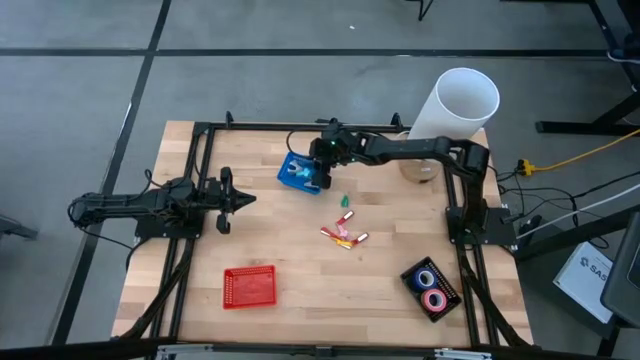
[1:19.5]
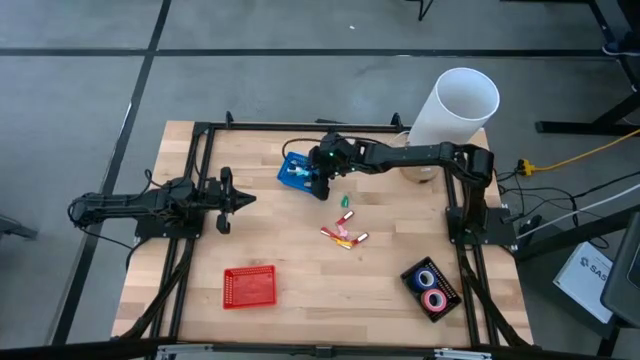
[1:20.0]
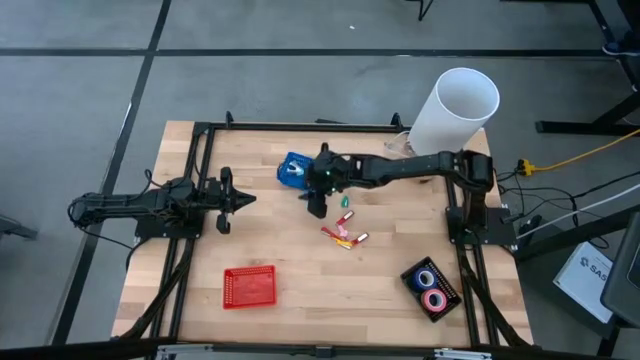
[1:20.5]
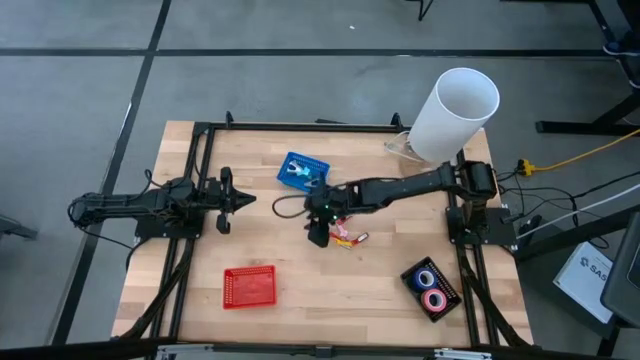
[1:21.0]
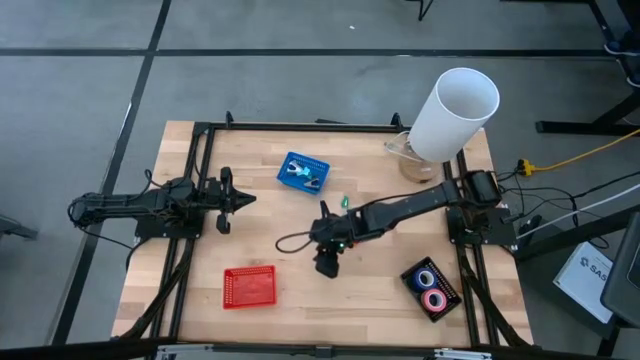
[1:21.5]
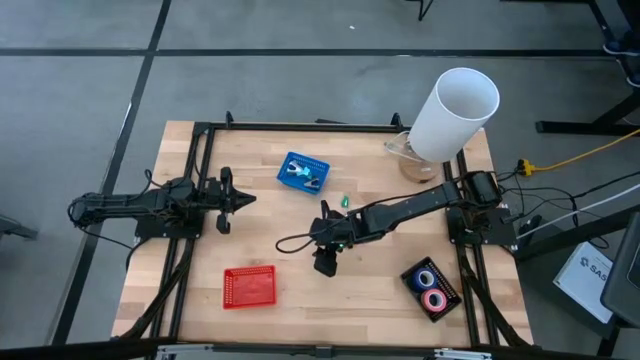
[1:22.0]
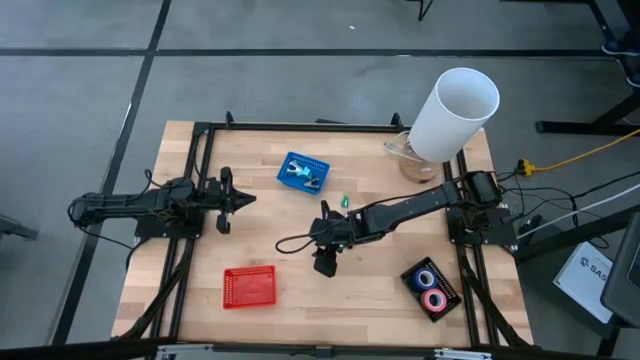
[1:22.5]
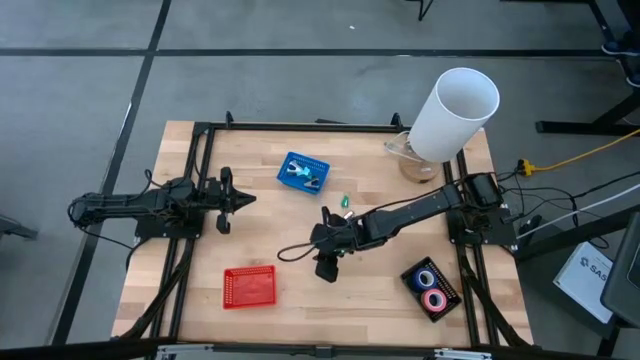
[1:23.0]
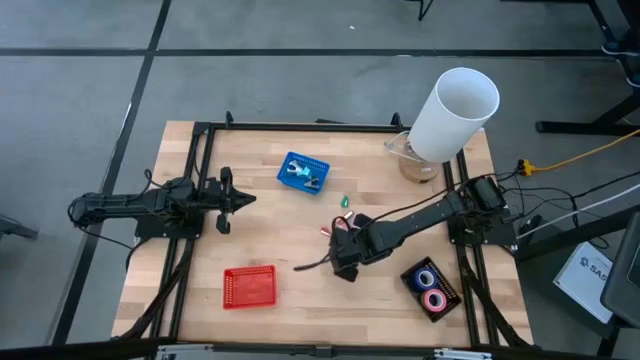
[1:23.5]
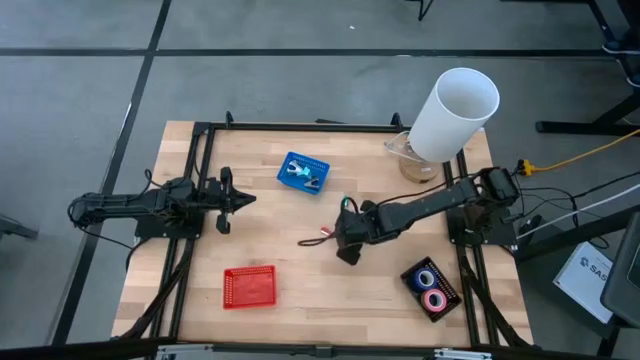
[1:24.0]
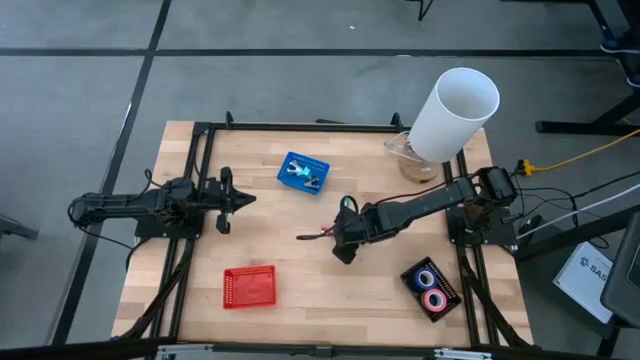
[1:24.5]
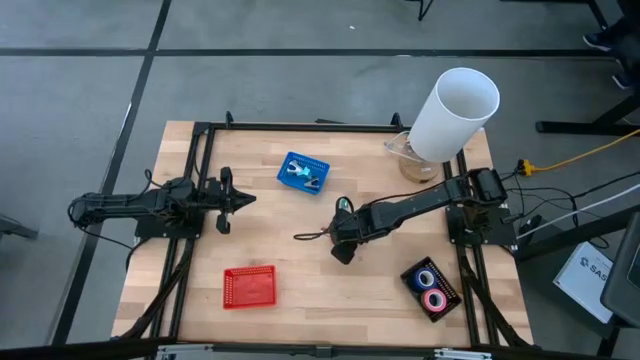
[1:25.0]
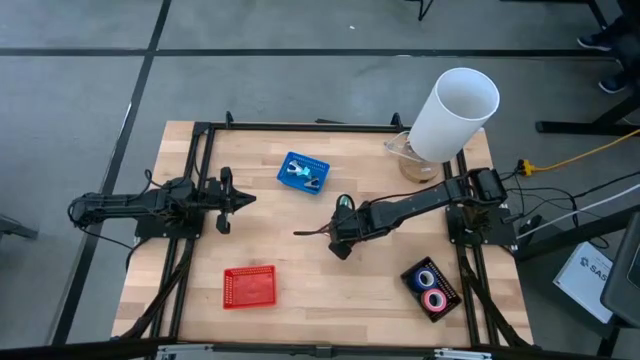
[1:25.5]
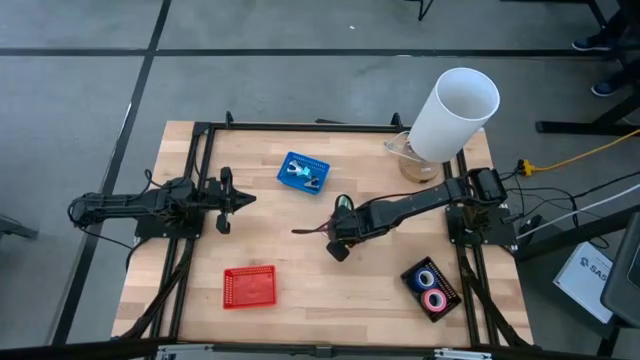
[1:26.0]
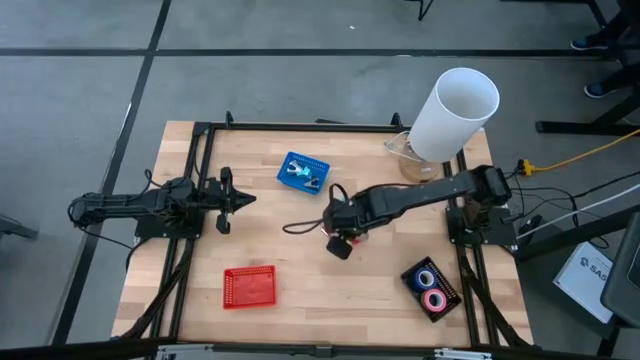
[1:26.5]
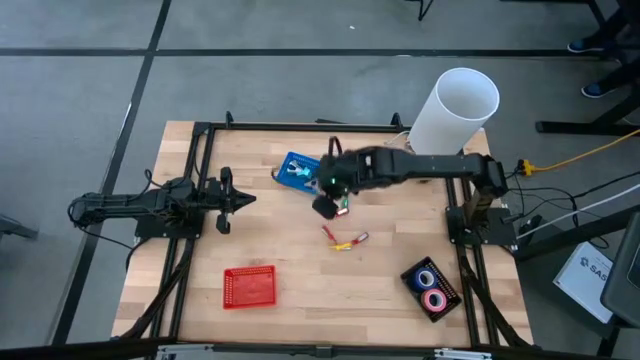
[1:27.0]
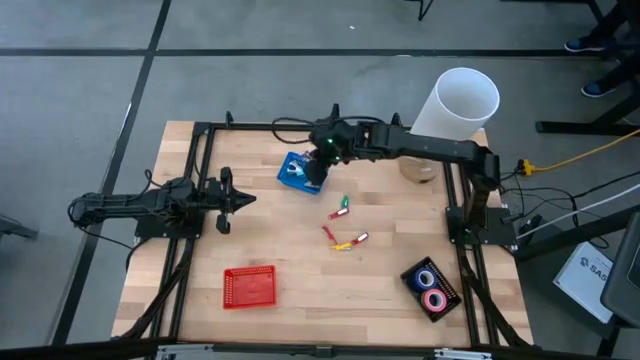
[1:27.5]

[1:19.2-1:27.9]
Task: Pick and place Stapler, Stapler remover, tape
Put the pink staple remover into the blue bin

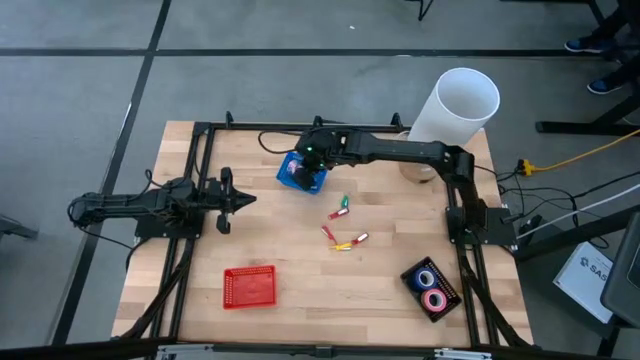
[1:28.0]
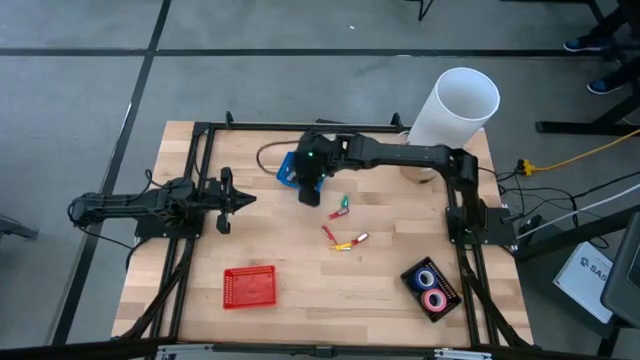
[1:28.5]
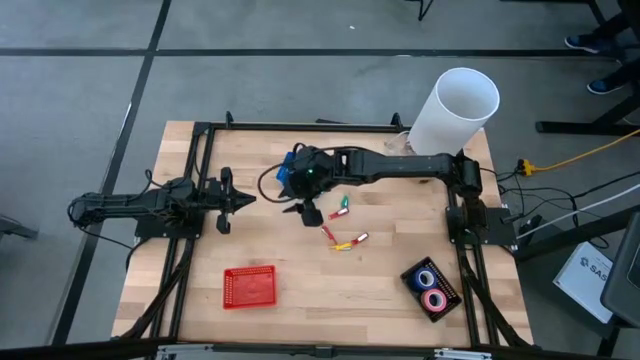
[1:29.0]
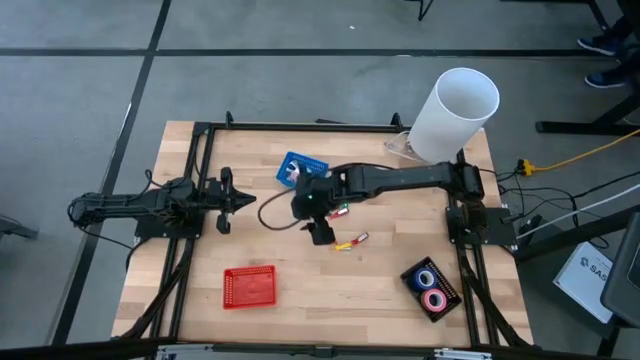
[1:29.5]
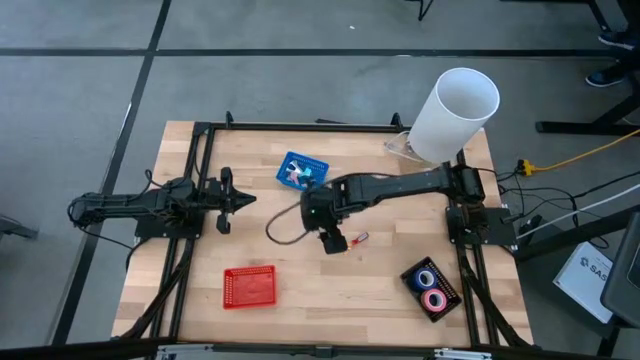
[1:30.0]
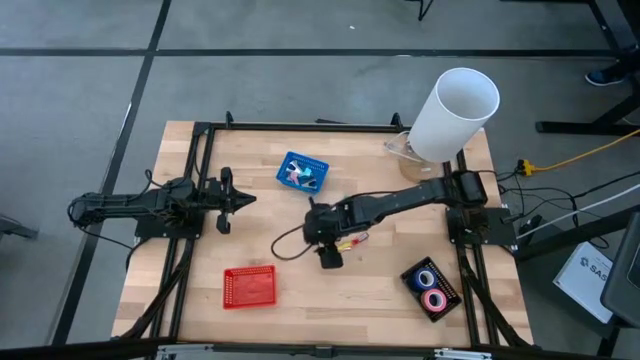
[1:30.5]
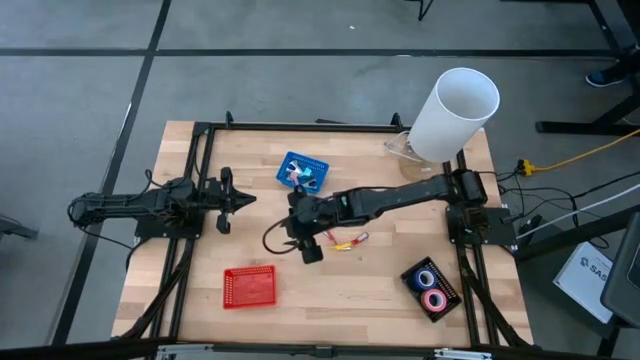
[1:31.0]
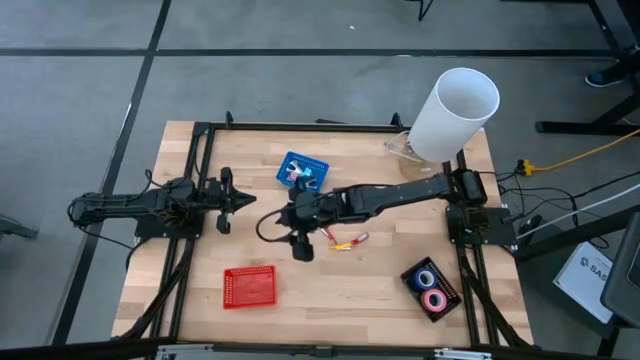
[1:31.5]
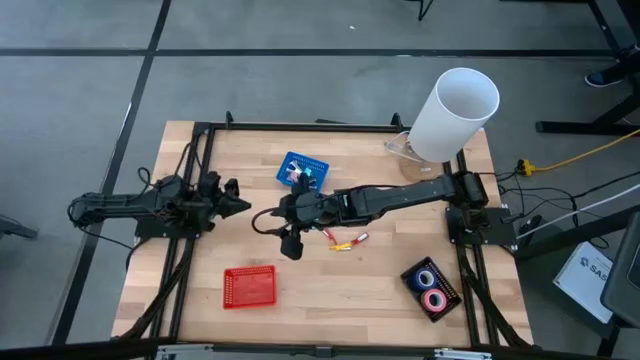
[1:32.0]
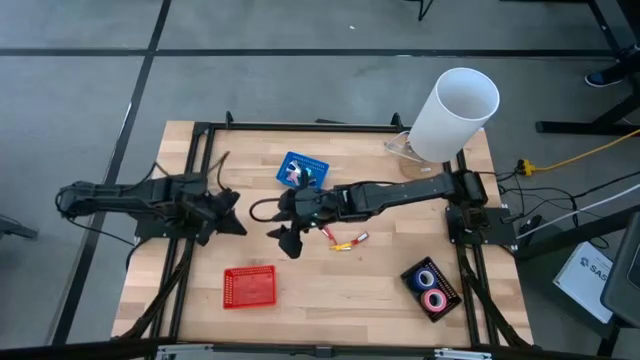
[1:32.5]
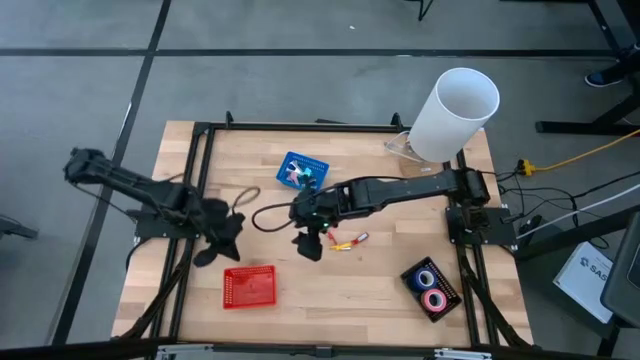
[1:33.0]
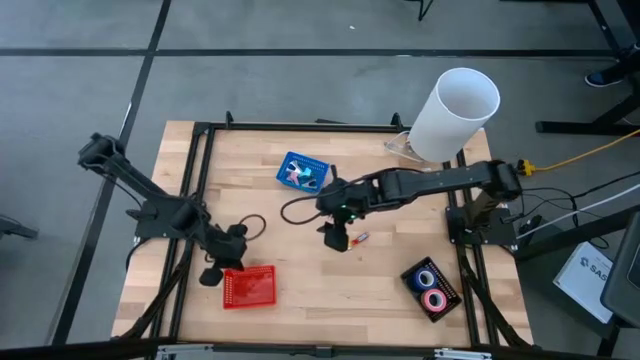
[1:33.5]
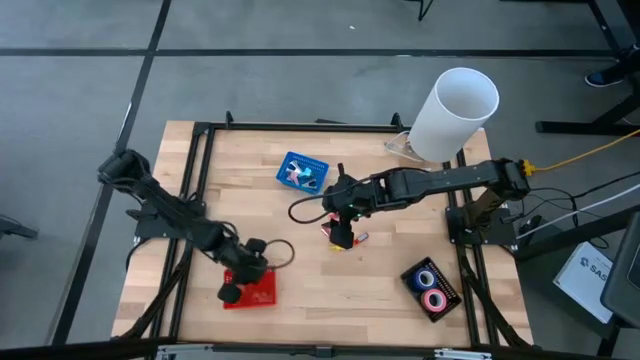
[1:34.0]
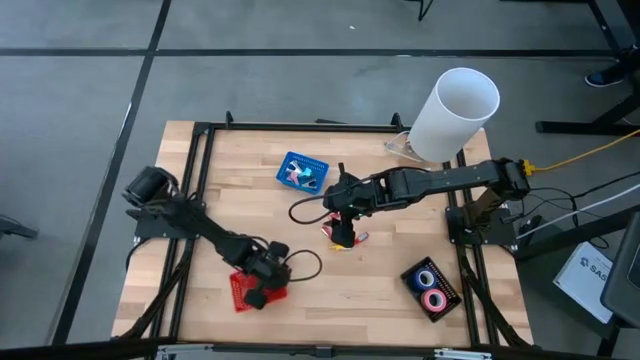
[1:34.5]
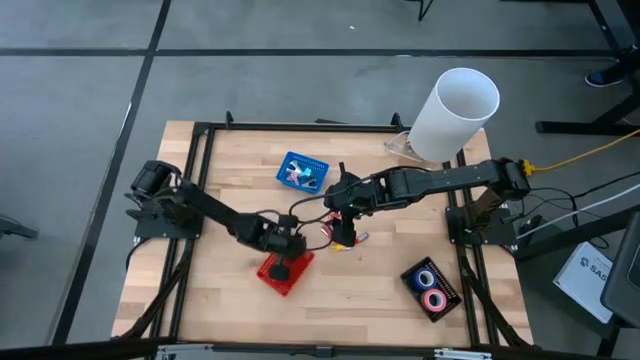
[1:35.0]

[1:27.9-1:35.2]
Adjust the red bin

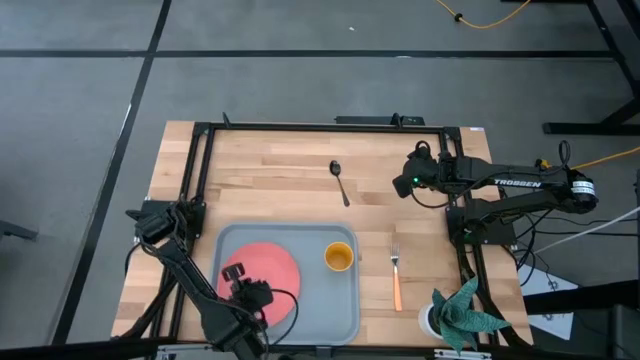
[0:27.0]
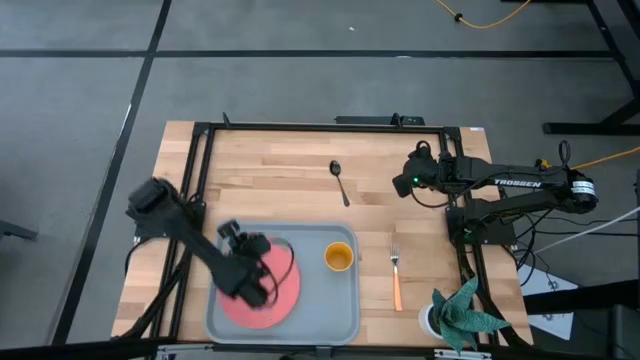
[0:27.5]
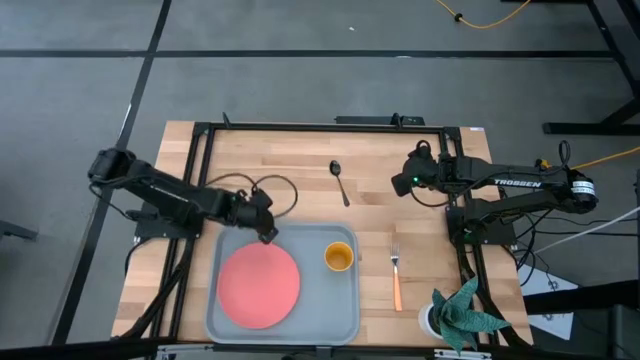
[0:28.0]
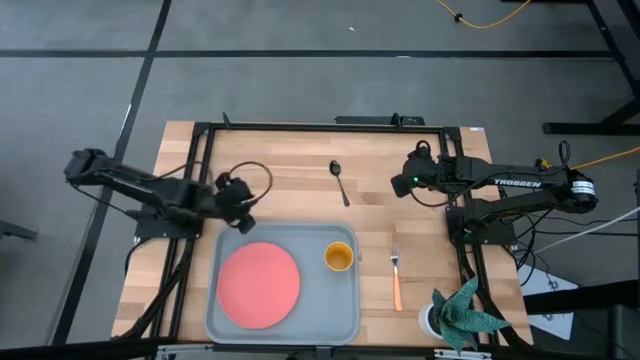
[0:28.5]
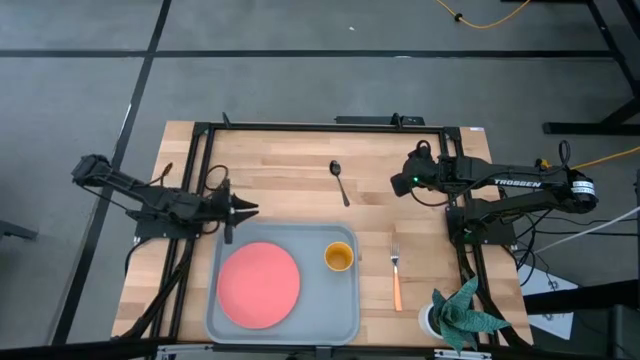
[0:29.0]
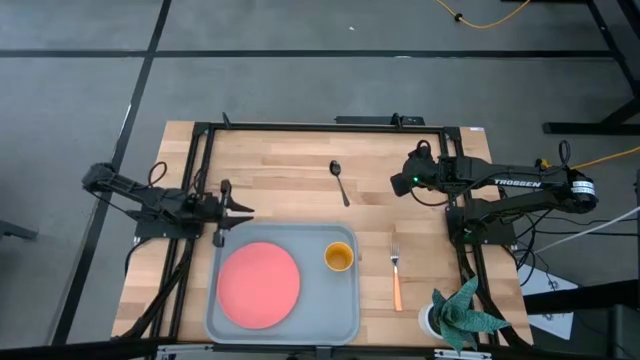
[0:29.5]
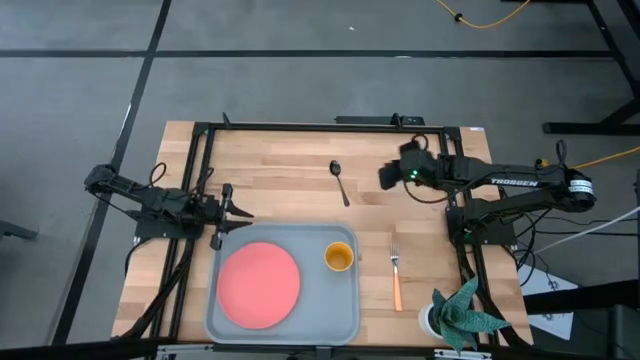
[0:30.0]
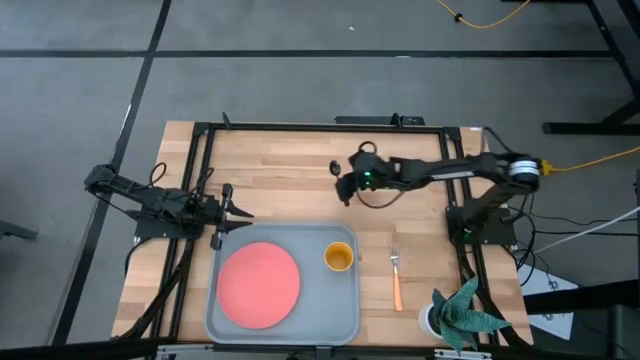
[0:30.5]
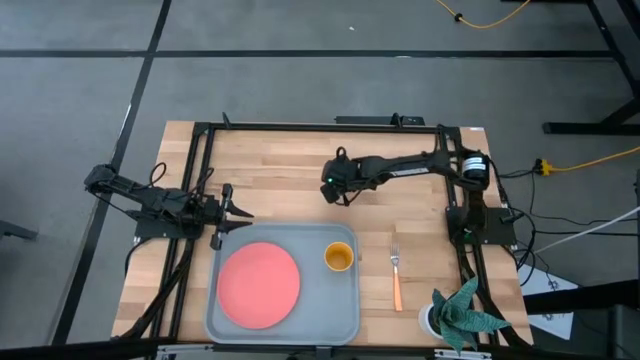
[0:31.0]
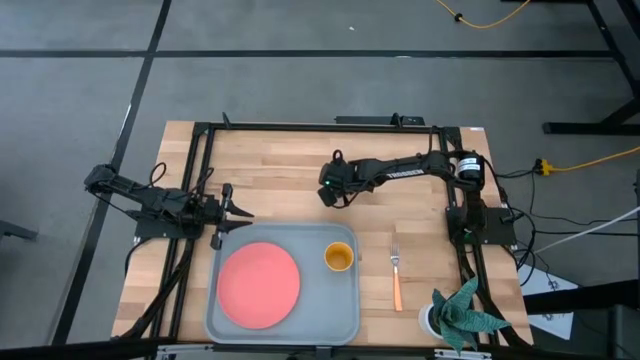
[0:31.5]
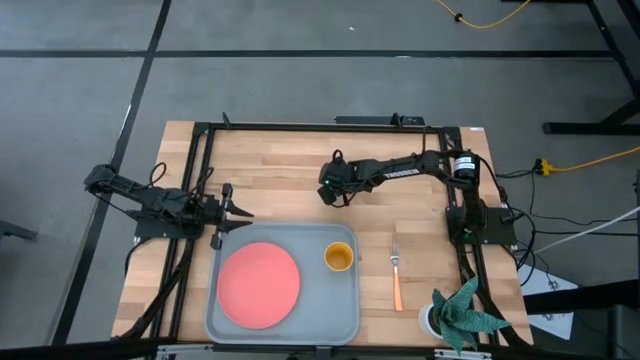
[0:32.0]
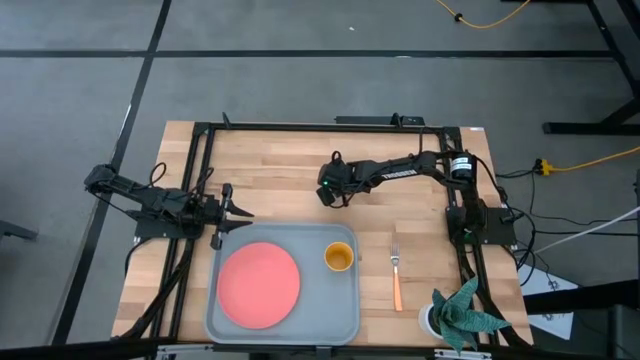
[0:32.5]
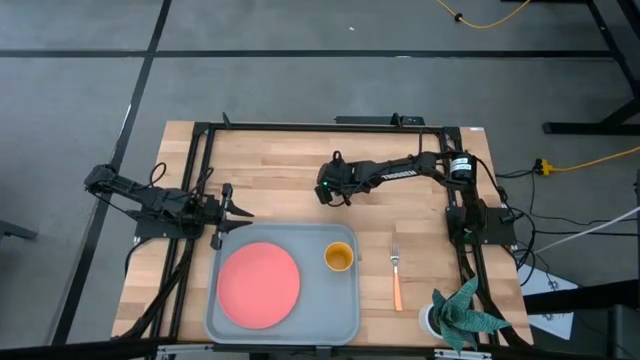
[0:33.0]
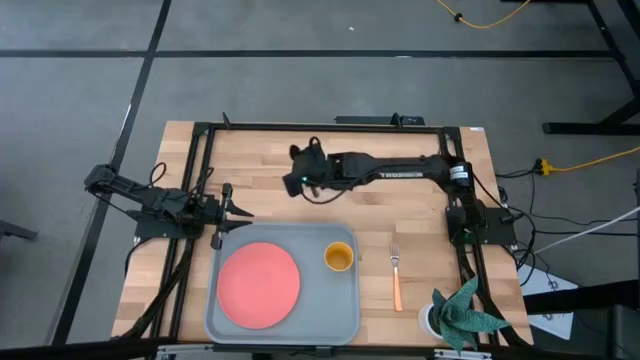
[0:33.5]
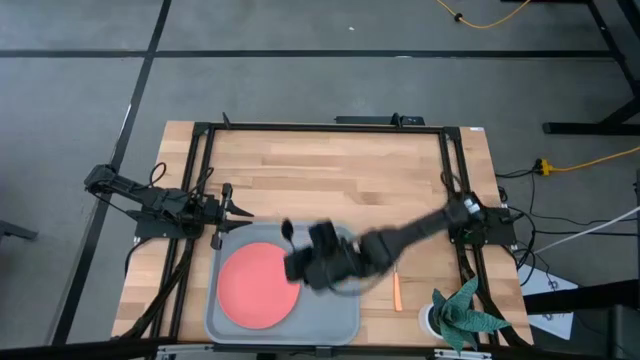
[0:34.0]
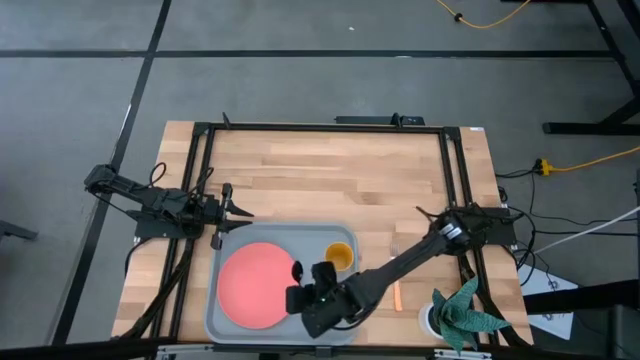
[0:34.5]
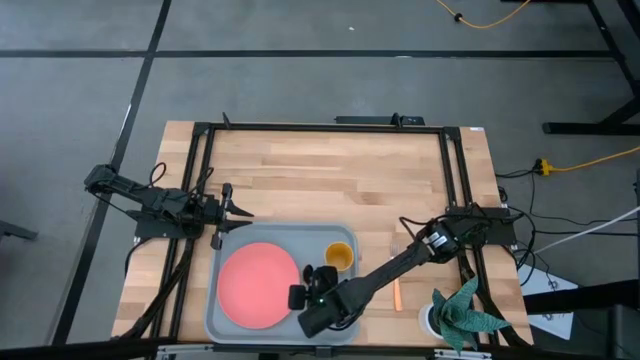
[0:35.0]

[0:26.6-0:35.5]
Task: Pick and place plate/cup/fork/spoon on tray
Put the black spoon on the gray tray to the right of the pink plate
